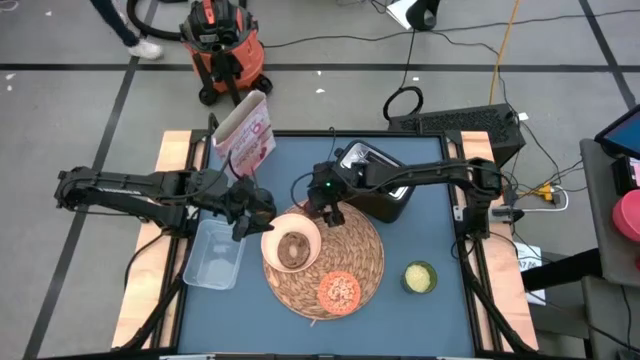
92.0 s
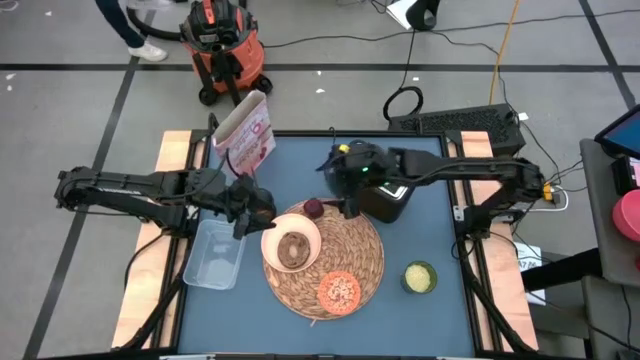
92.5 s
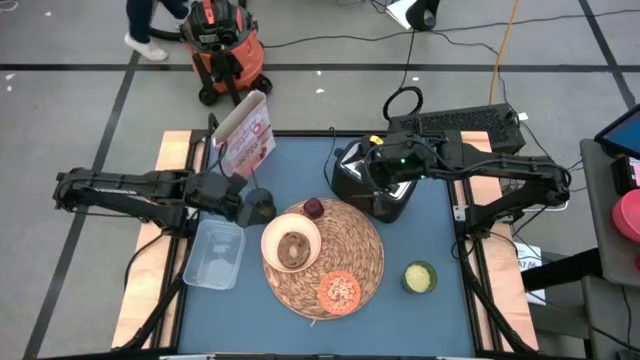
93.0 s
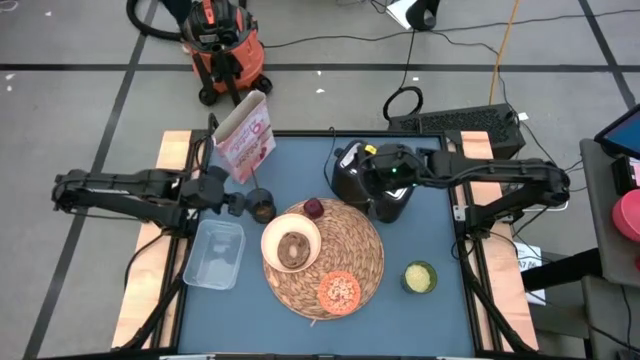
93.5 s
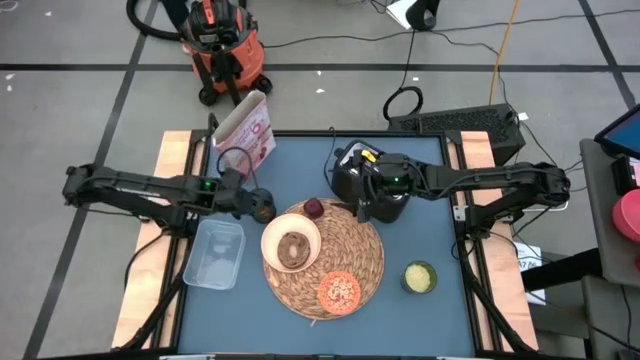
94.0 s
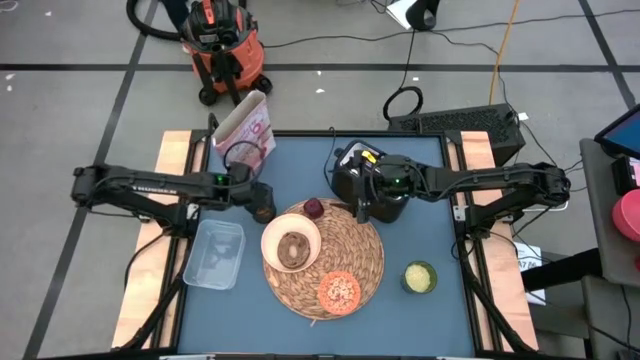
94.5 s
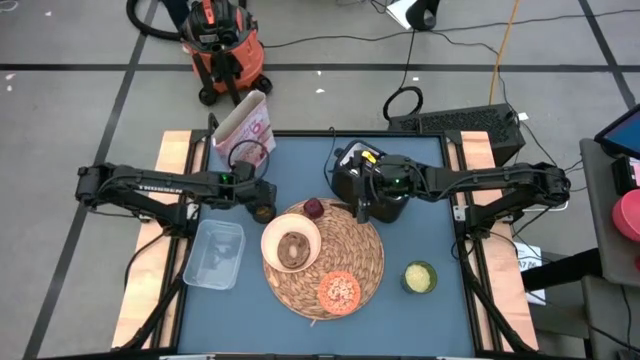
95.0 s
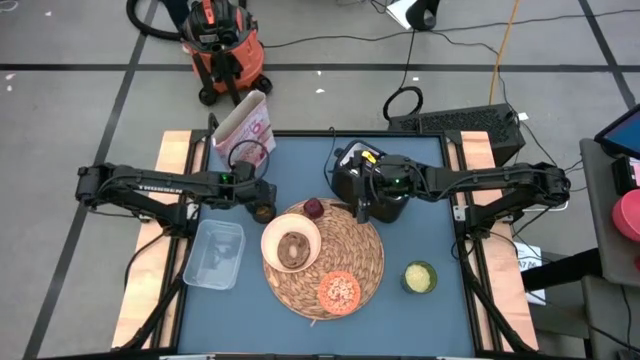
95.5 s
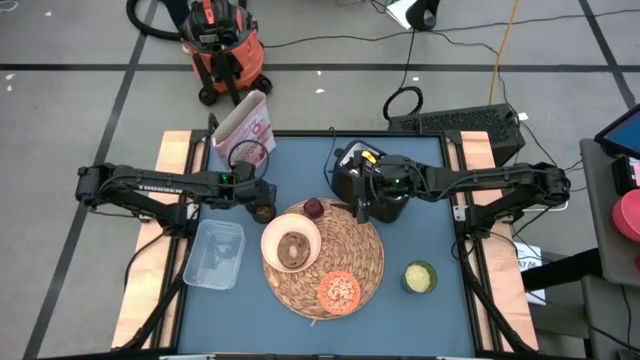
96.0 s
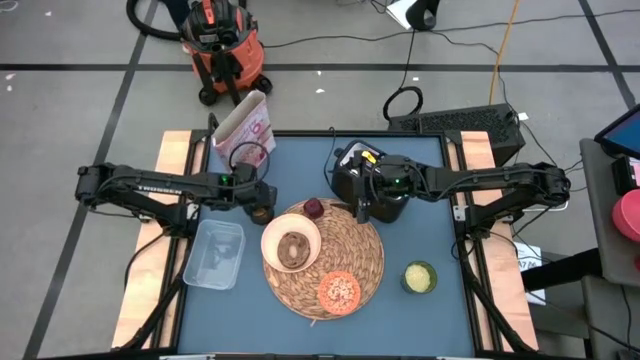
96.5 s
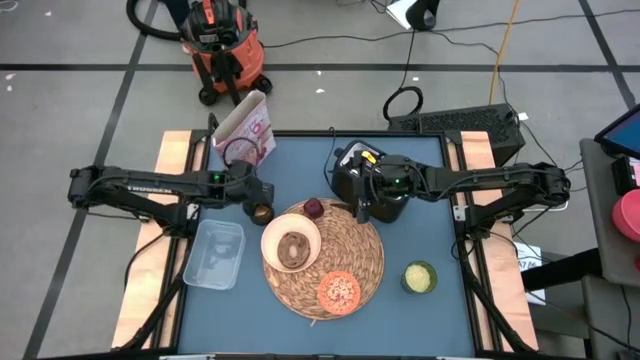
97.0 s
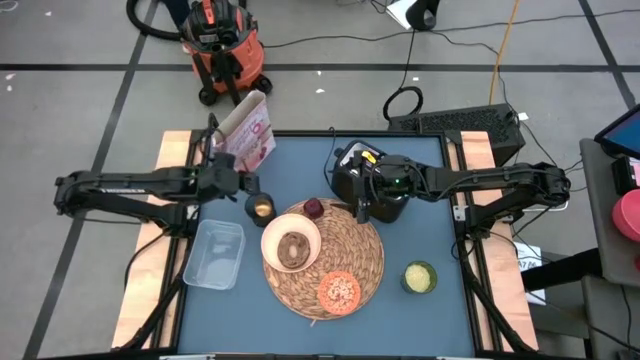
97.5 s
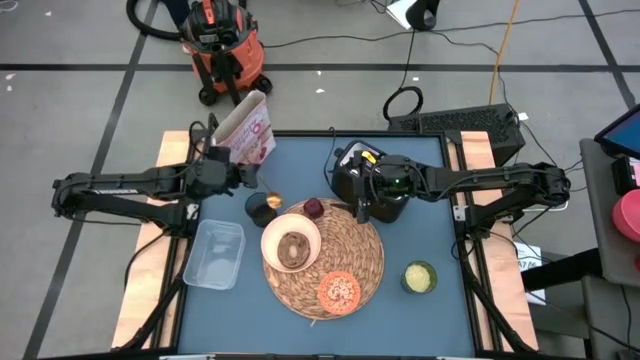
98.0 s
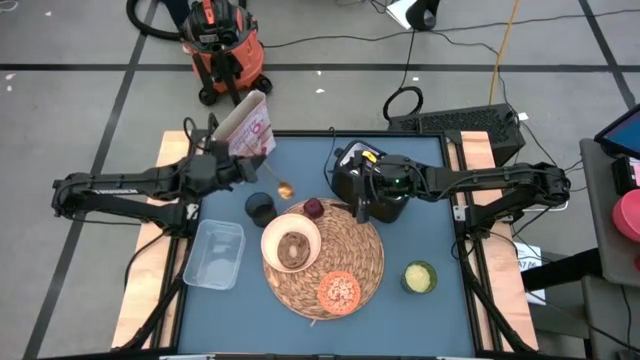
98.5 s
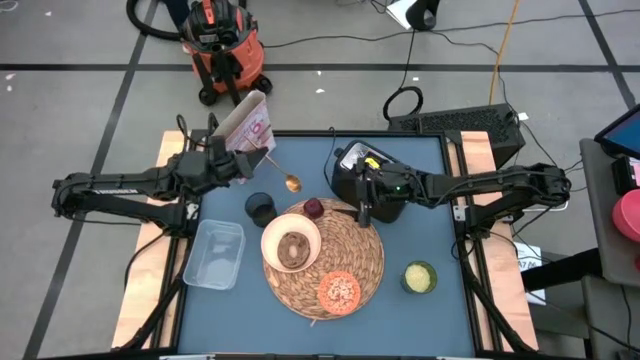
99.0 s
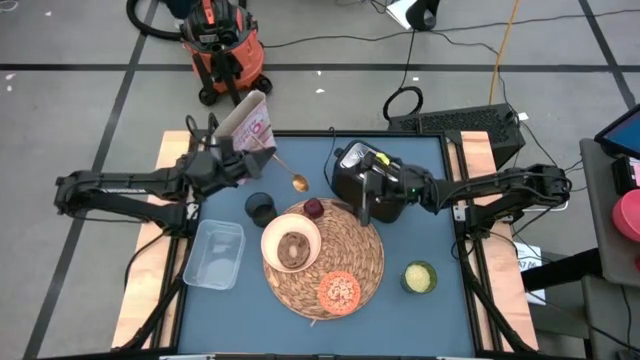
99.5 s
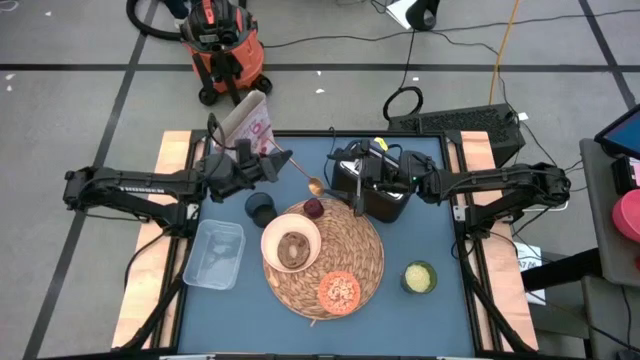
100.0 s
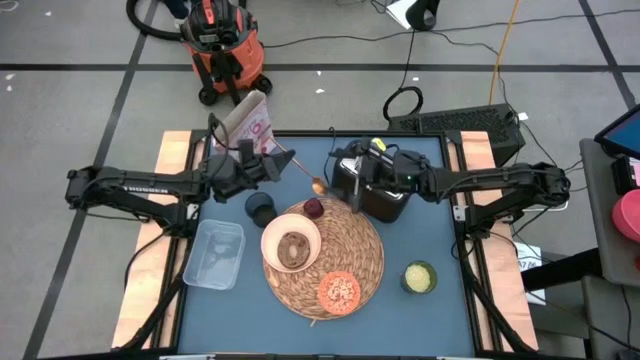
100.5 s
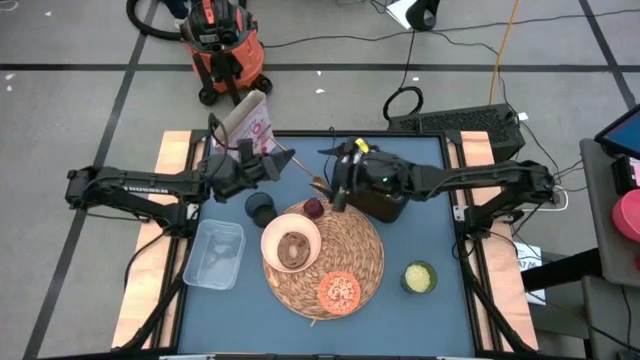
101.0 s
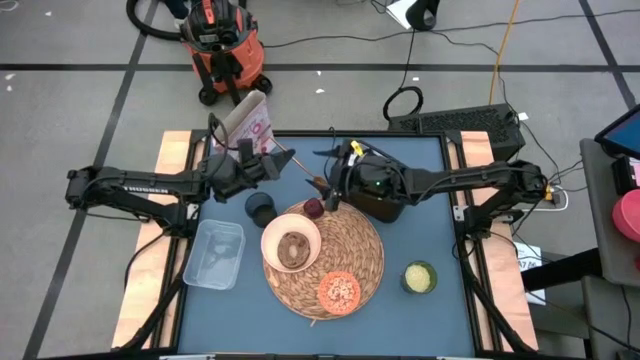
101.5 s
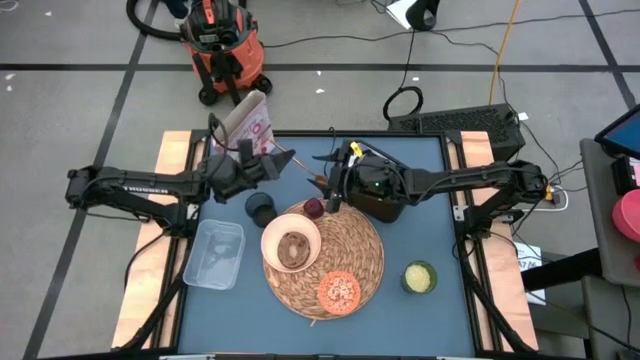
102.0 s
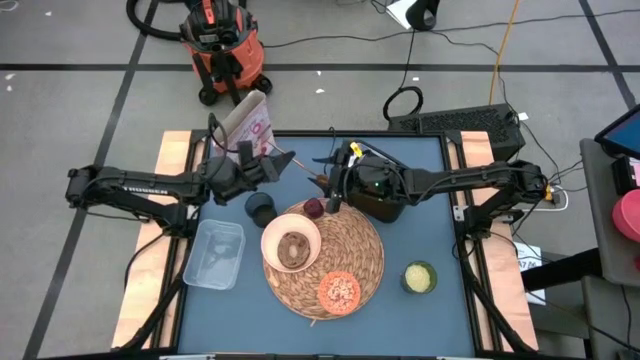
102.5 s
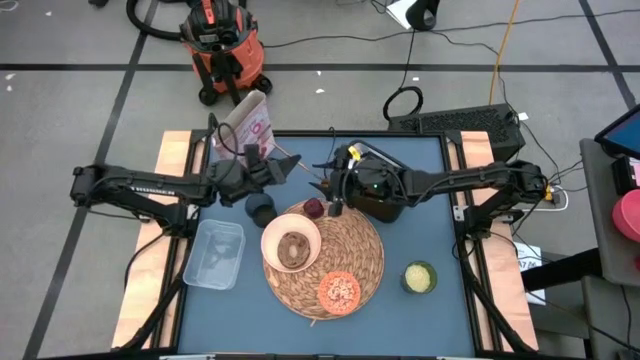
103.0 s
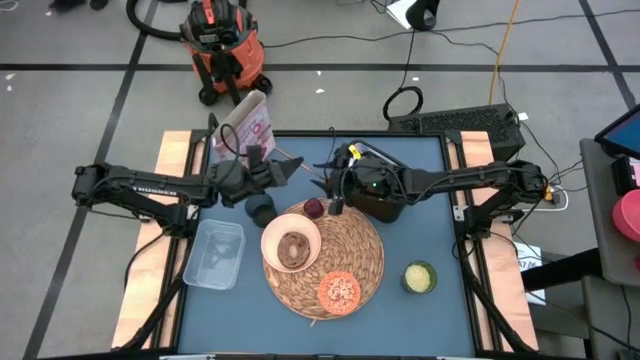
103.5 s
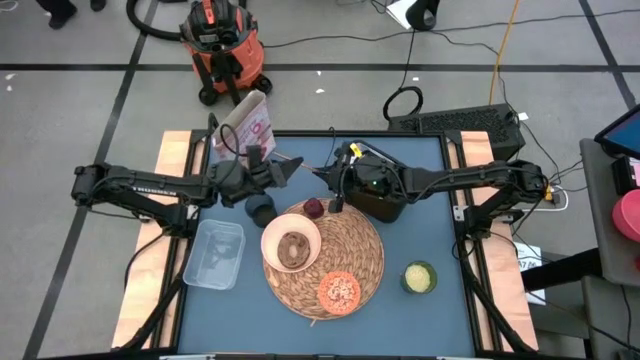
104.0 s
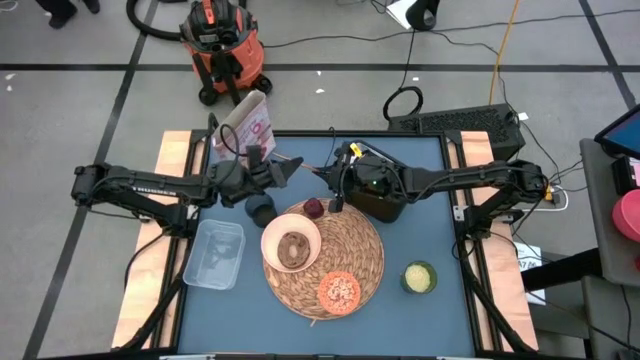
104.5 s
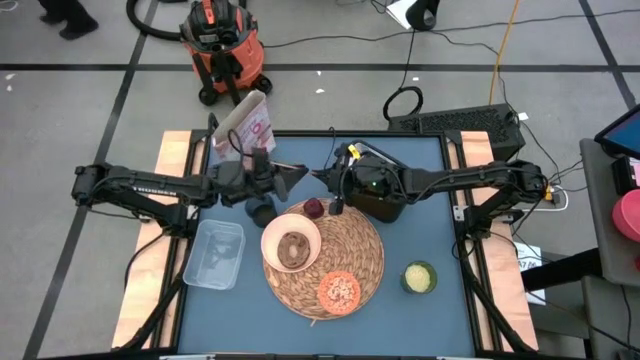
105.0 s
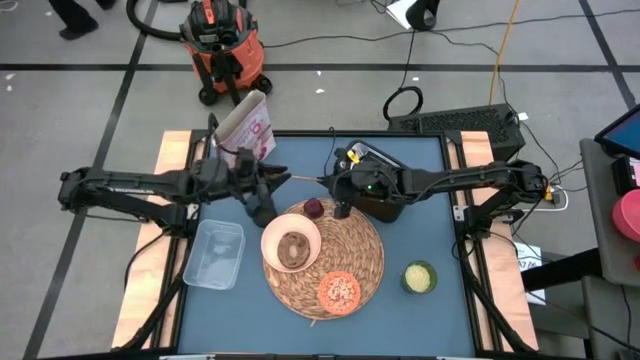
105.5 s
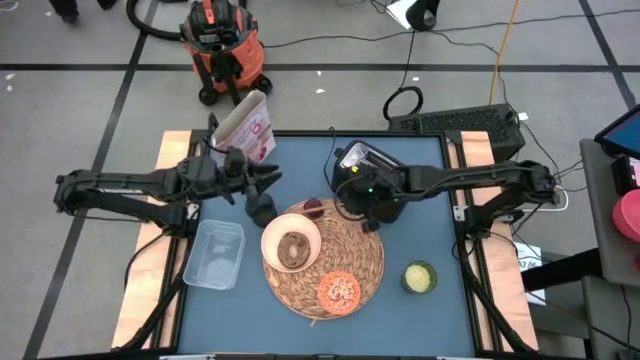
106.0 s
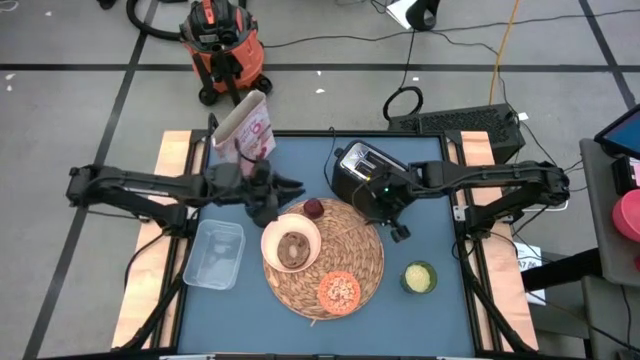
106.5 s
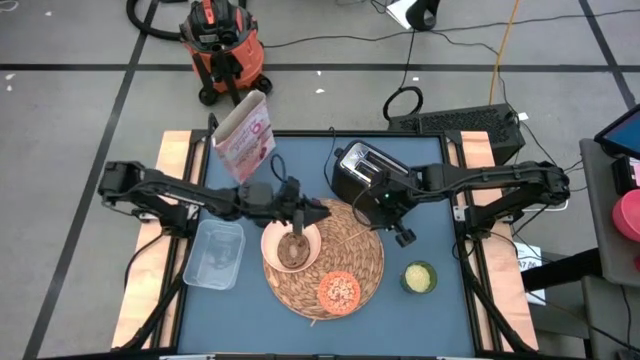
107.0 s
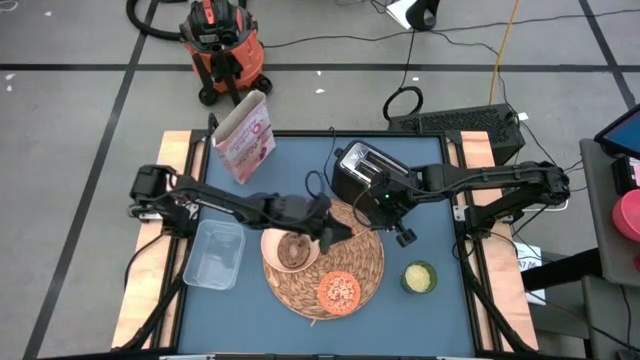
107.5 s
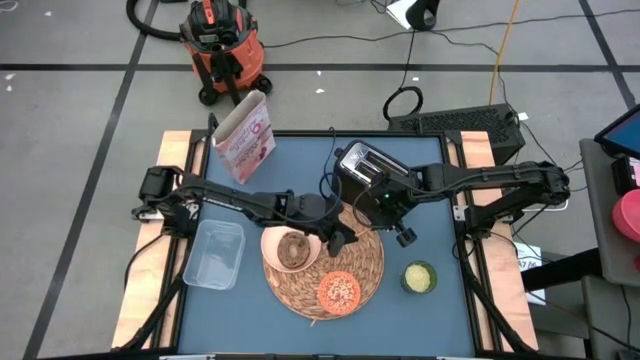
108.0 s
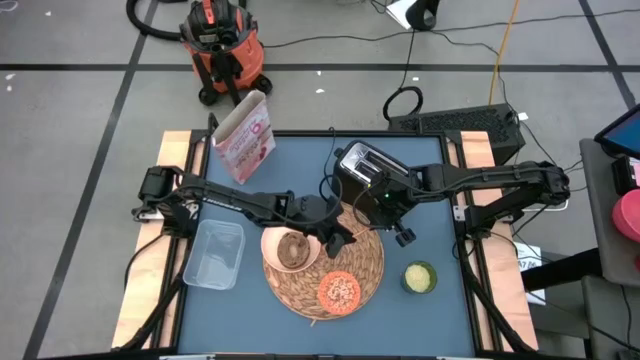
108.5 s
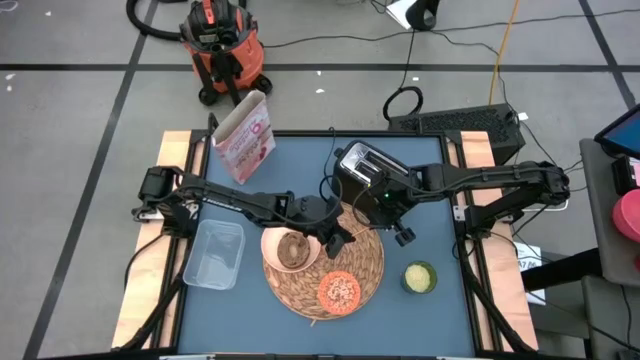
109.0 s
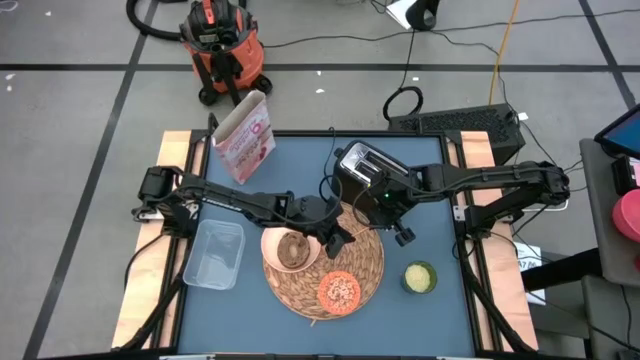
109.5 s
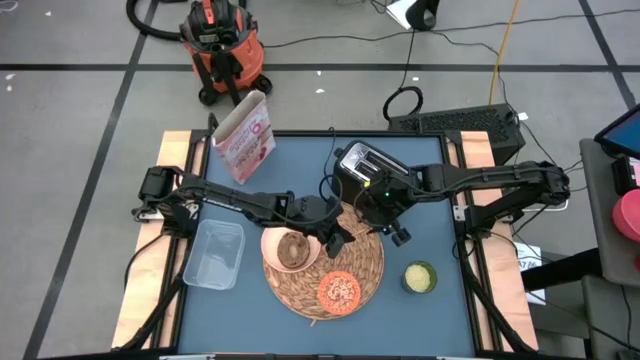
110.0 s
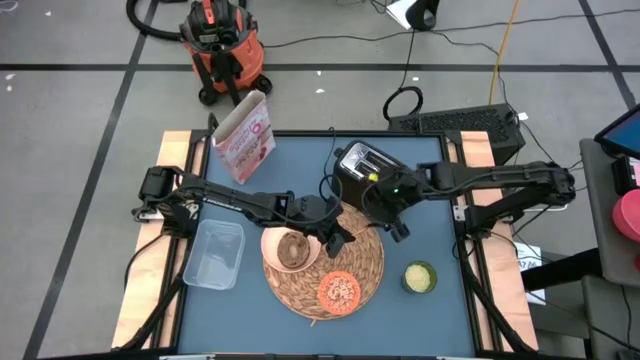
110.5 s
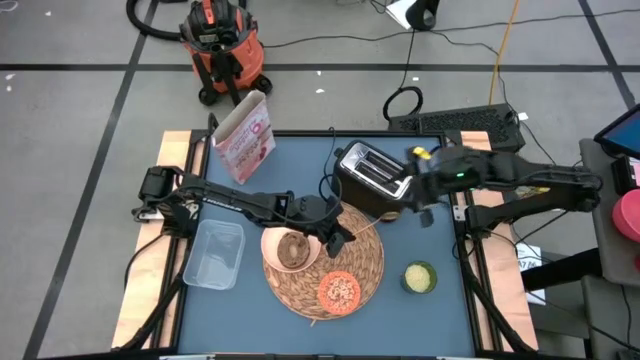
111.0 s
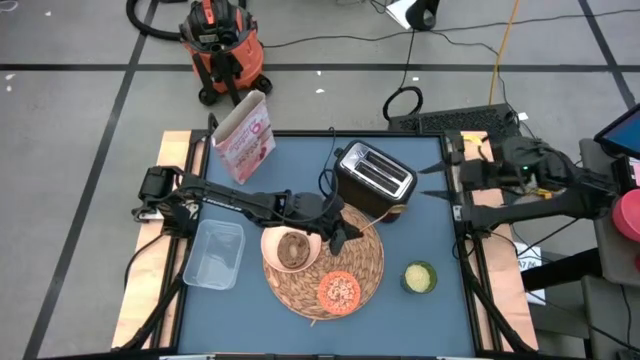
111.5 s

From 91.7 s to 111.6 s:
Task: Arrange a breakfast setting
Put the gold spoon on the placemat beside the orange bowl
